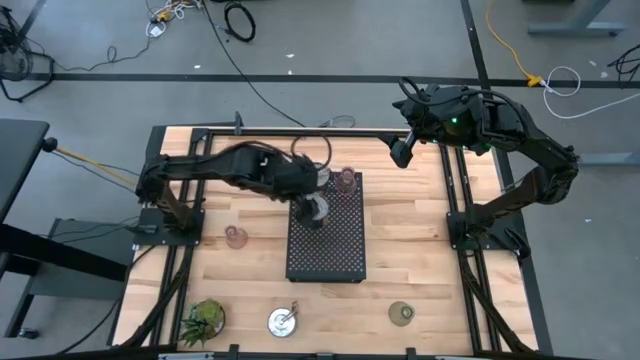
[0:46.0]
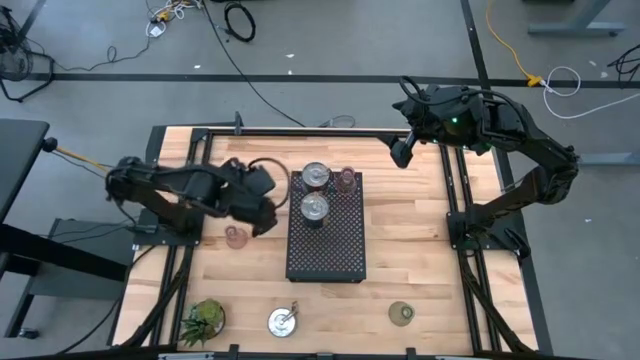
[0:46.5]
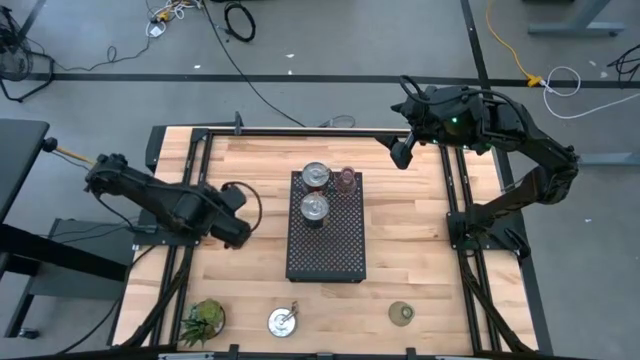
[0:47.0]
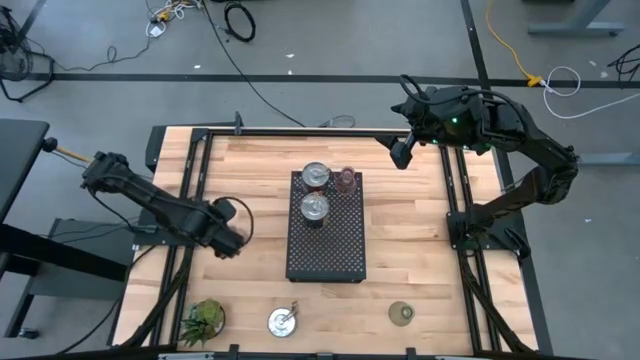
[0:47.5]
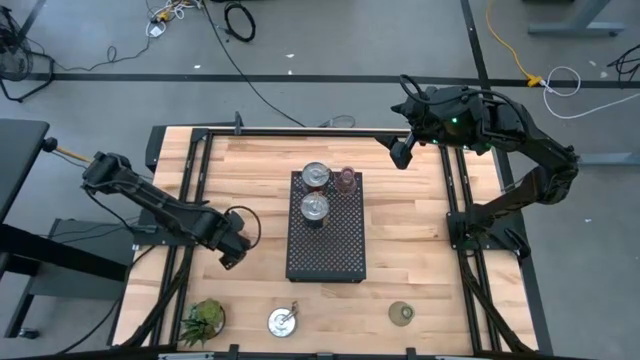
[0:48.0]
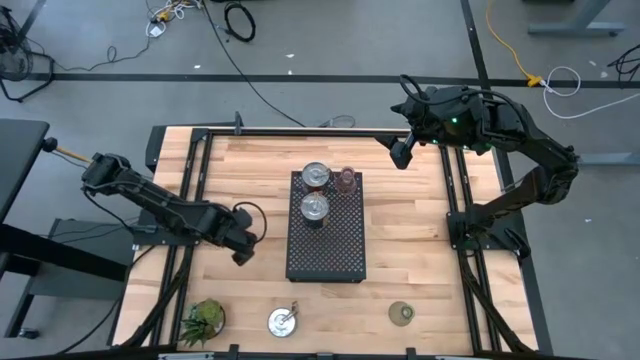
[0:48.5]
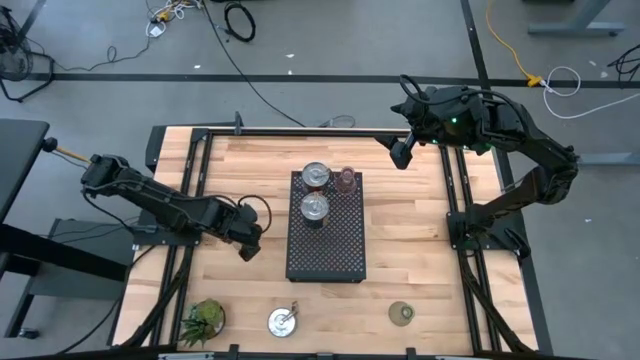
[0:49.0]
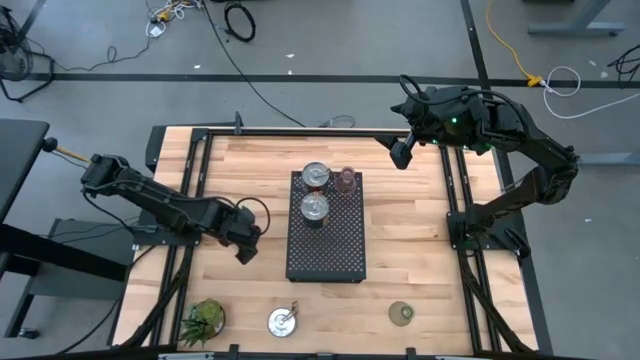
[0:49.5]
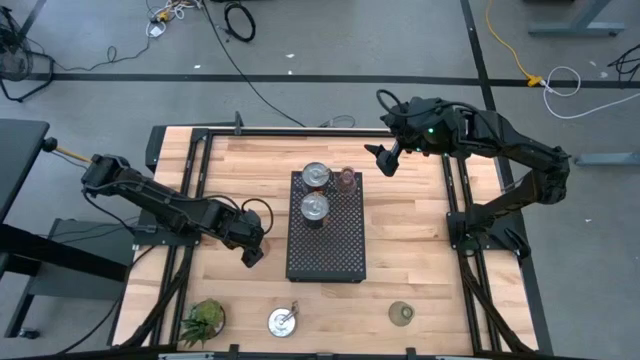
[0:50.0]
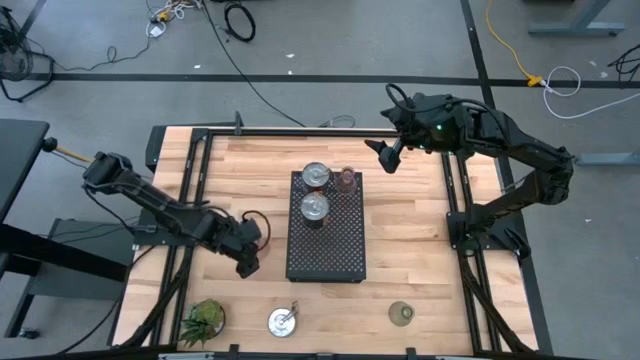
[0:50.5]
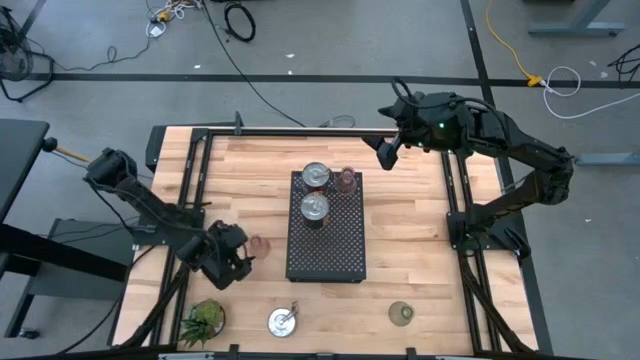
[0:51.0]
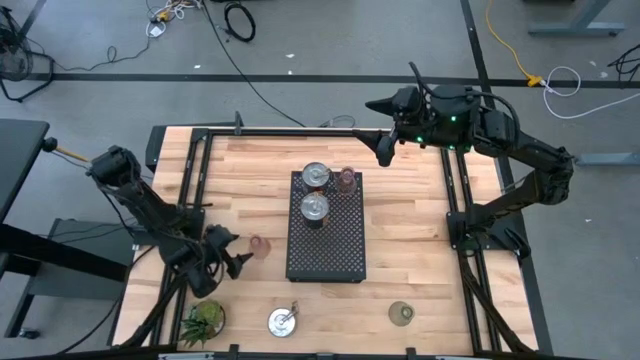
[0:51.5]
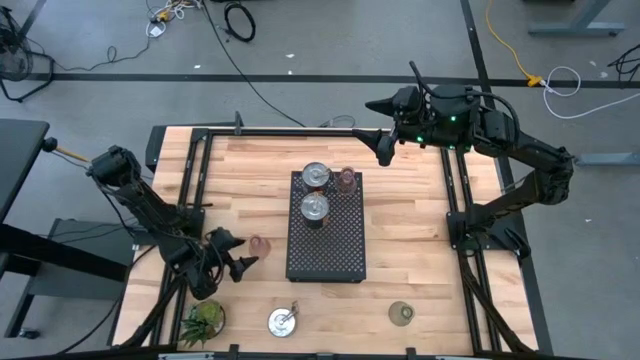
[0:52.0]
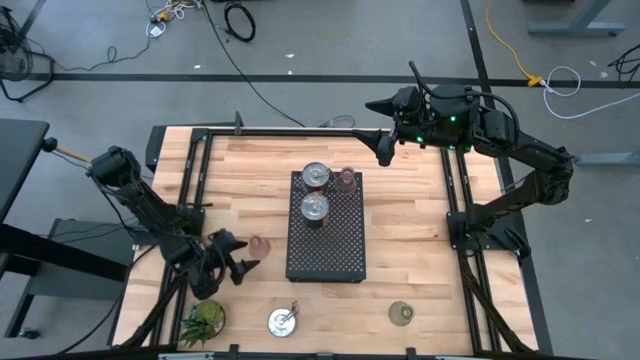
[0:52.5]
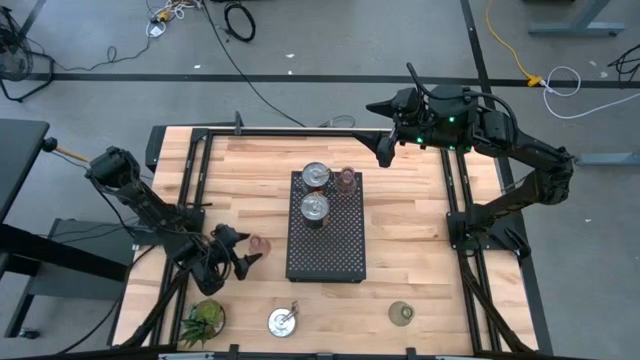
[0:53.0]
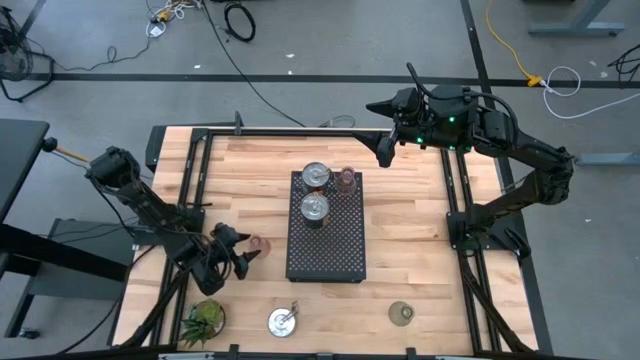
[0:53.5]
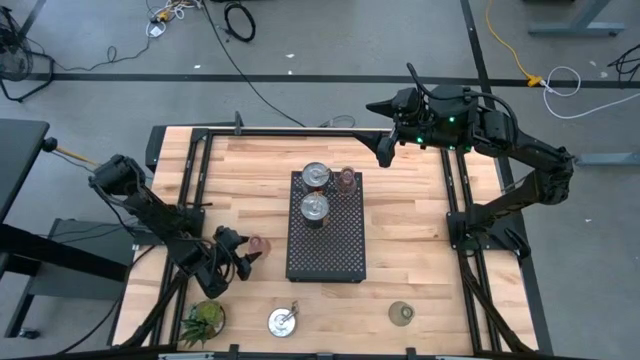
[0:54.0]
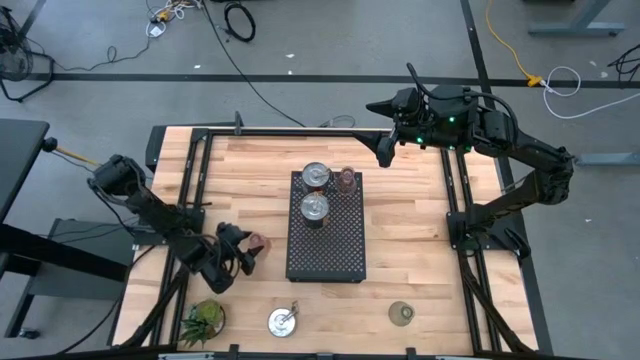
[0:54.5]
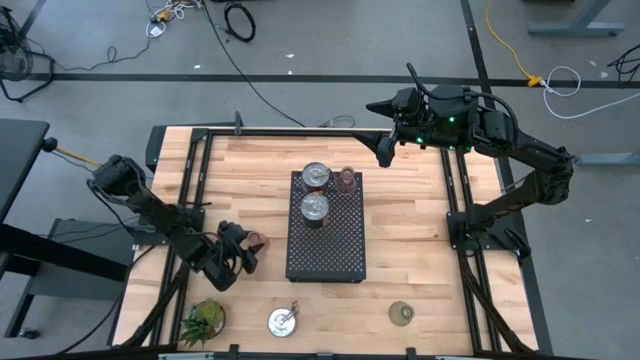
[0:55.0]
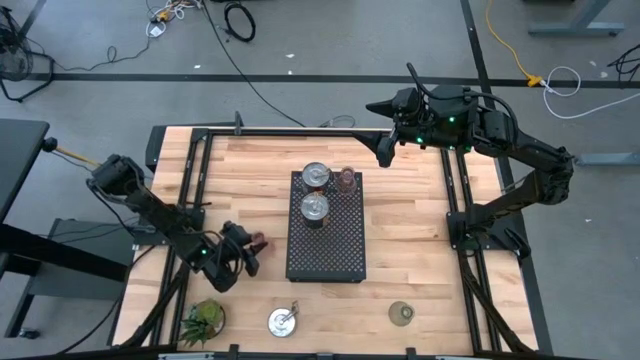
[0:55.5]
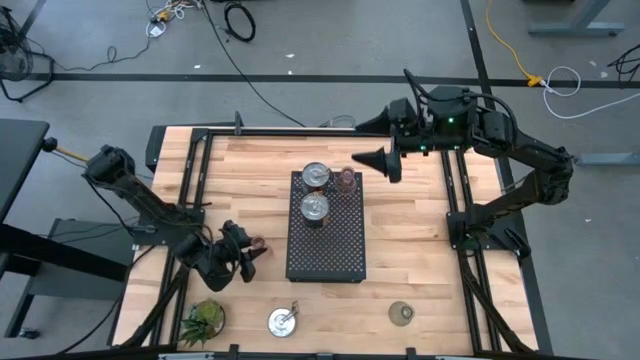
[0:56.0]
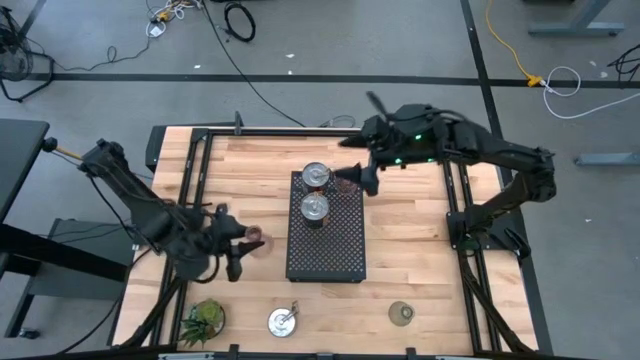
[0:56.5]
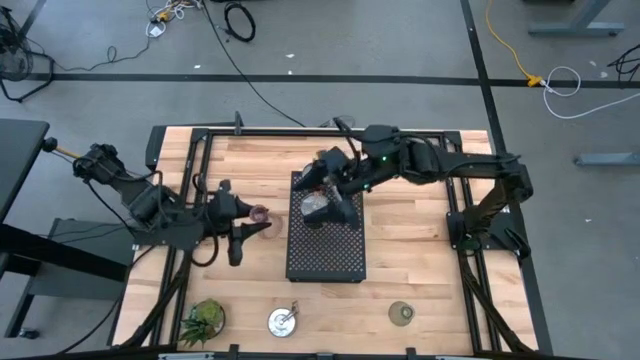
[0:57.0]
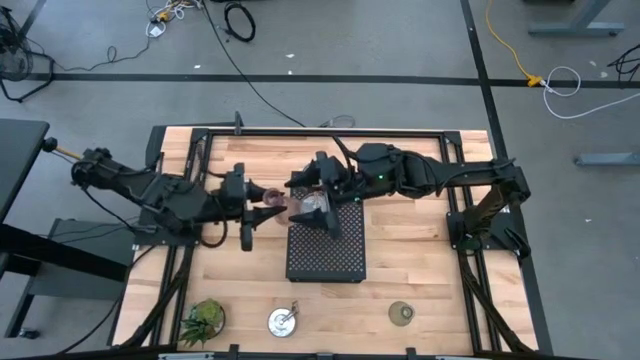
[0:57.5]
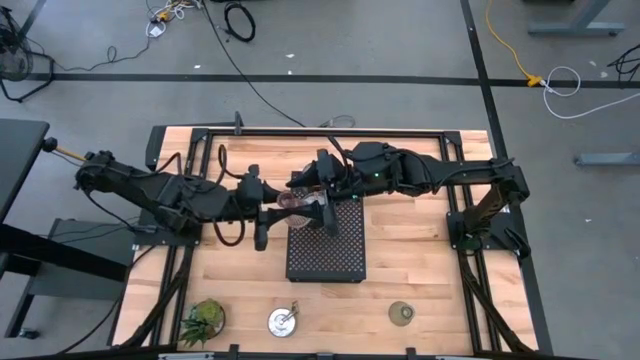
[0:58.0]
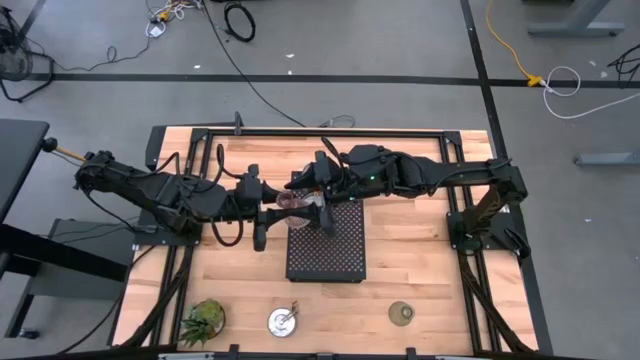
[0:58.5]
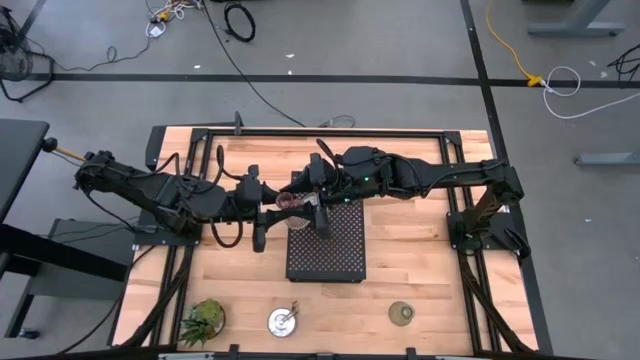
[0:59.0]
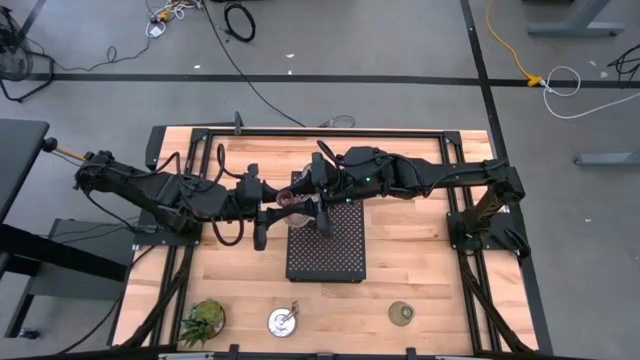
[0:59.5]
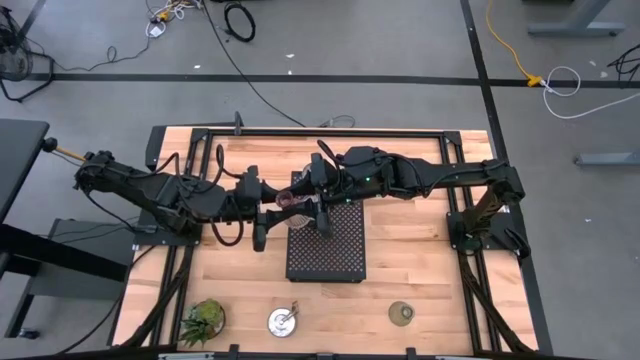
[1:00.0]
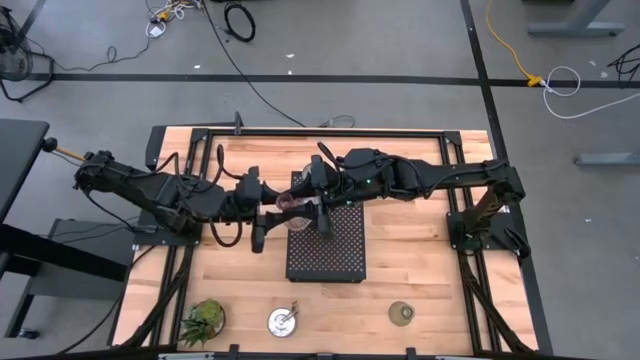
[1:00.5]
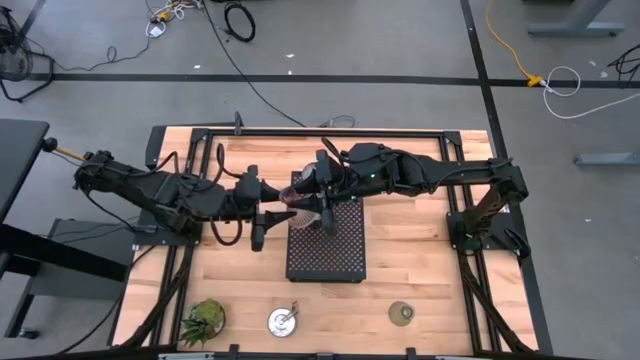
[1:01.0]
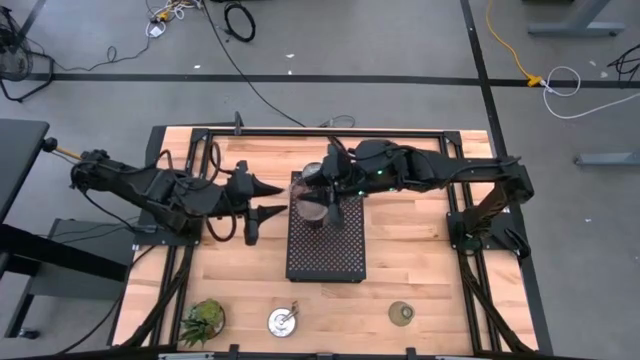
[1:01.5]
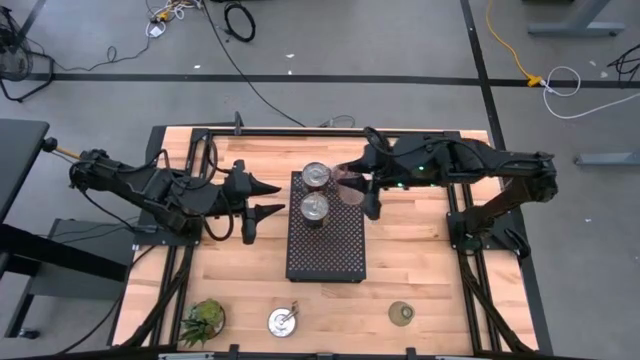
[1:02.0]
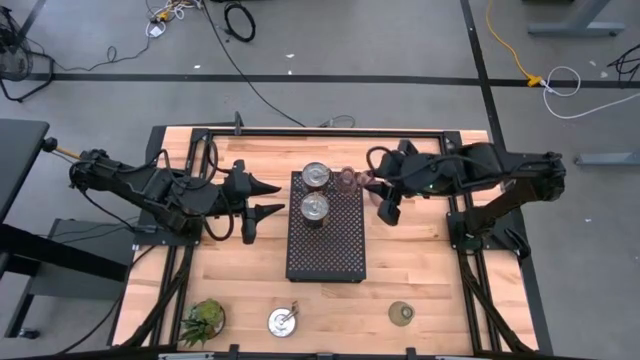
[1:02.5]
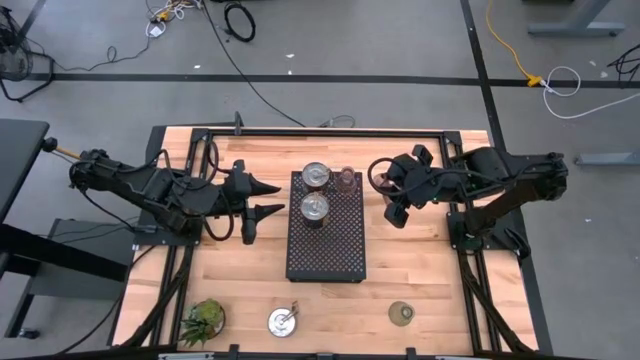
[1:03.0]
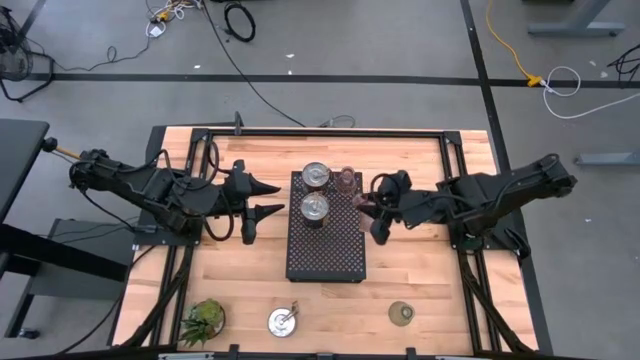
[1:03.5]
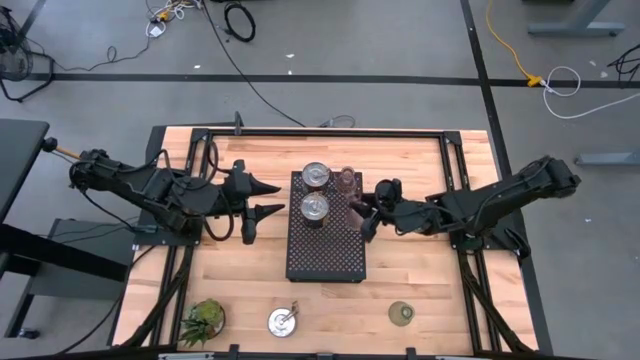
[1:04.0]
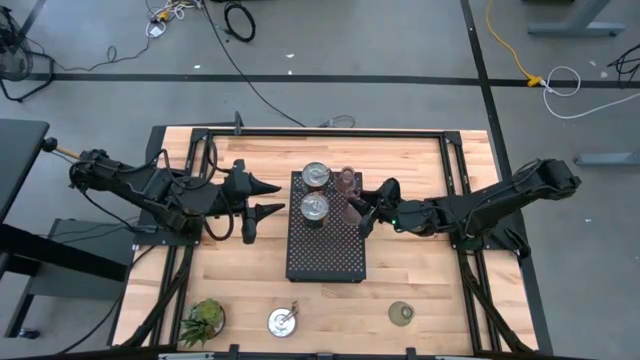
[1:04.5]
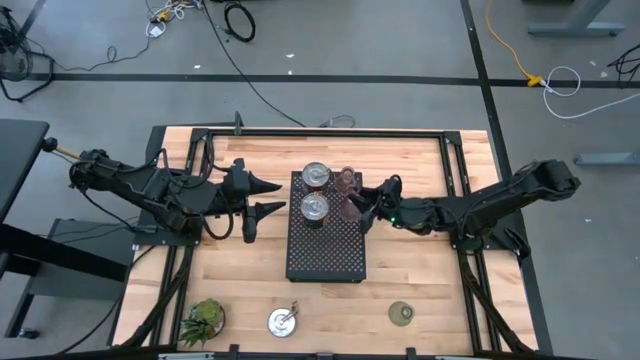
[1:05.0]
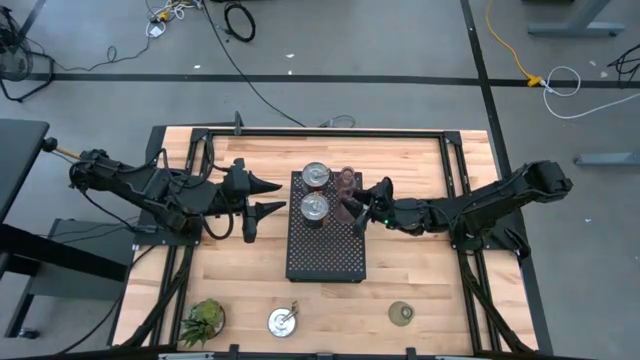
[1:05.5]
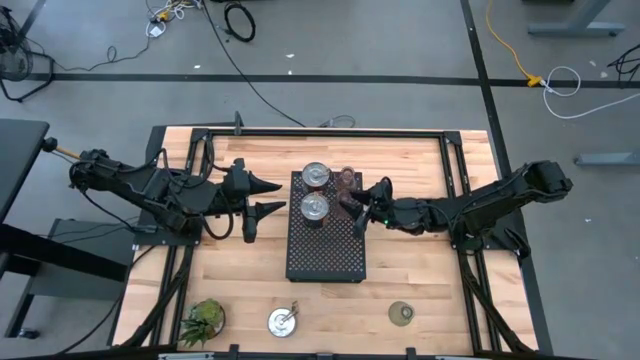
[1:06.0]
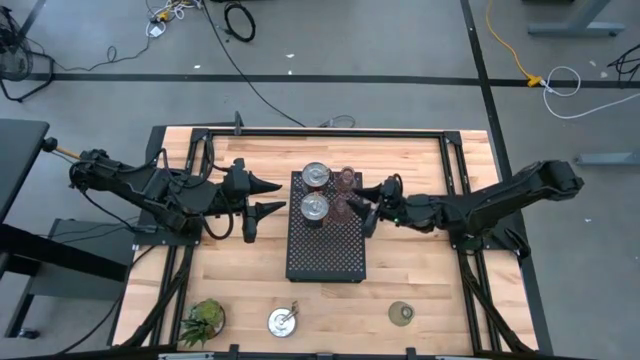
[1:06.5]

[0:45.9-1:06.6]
Task: Pick & Place candle stick holders
Put the pink glass candle holder on the shelf aligned with the other glass candle holder

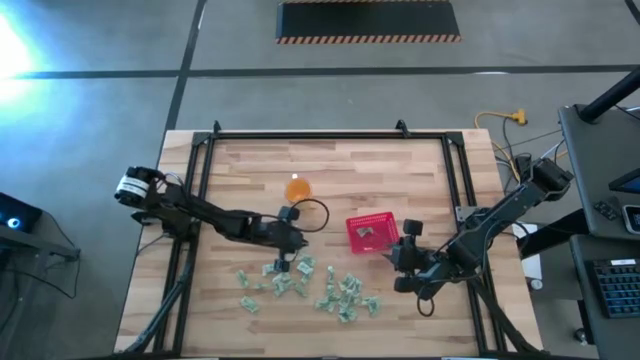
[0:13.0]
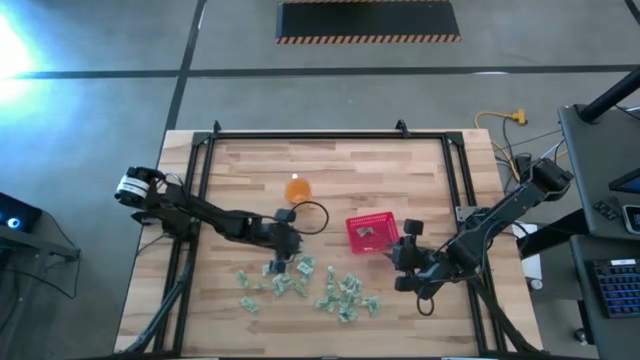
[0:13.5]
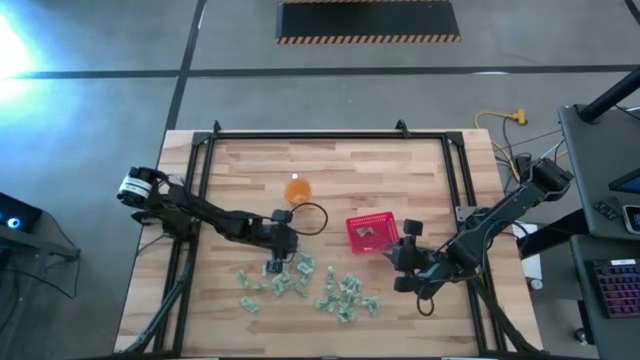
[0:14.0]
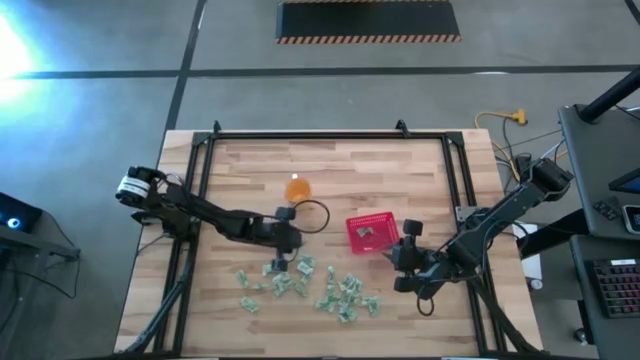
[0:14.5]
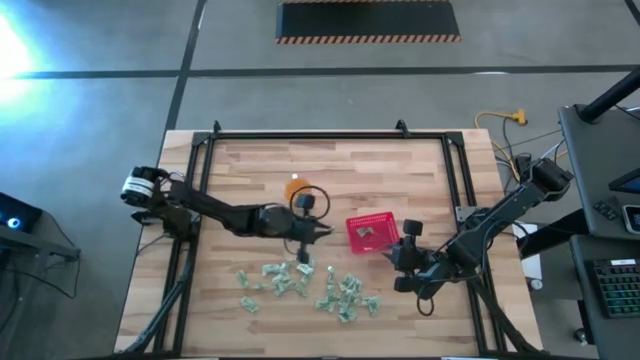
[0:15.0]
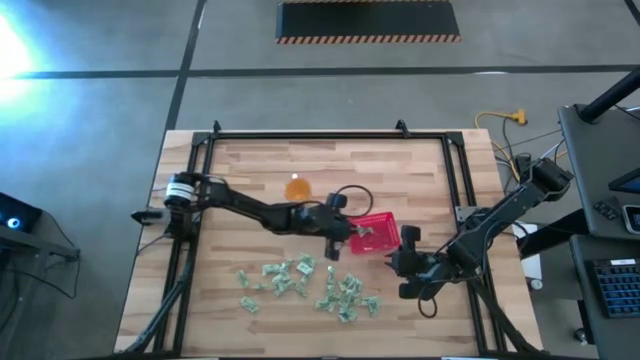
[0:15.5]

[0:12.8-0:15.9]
Task: Pick and place Stevia / Truvia into bins
Put the stevia packet into the basket
